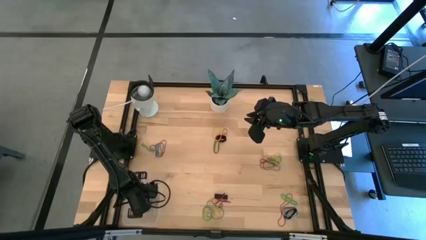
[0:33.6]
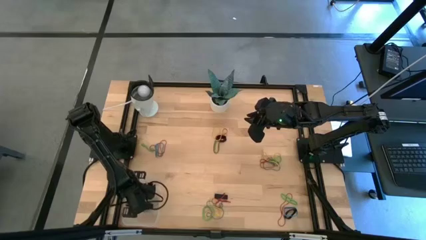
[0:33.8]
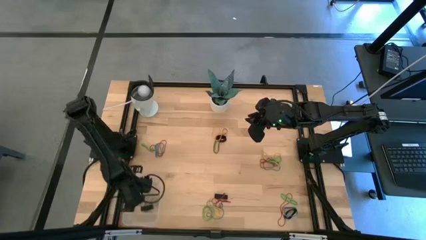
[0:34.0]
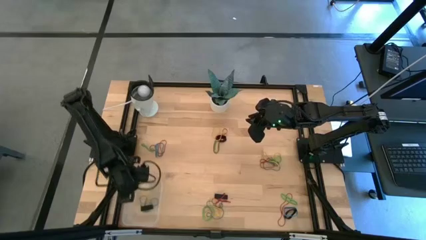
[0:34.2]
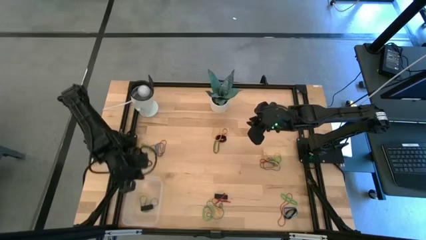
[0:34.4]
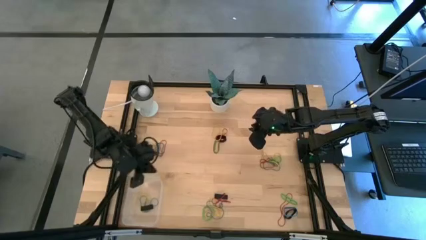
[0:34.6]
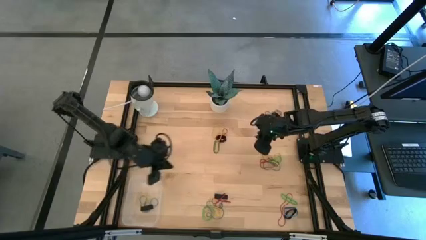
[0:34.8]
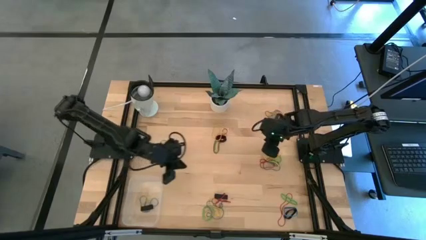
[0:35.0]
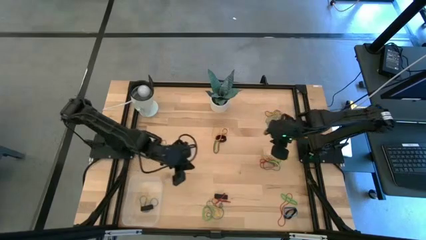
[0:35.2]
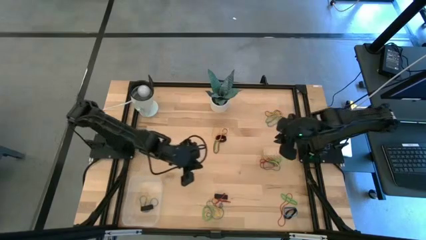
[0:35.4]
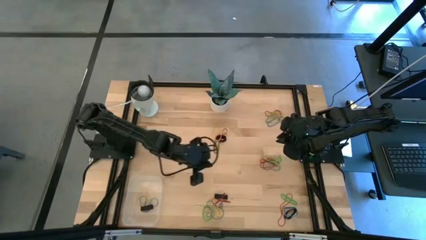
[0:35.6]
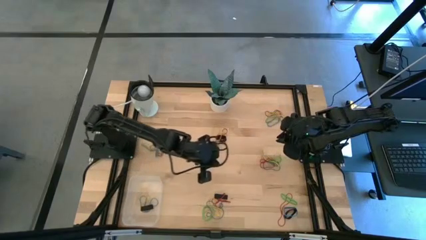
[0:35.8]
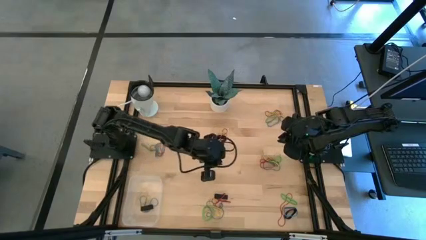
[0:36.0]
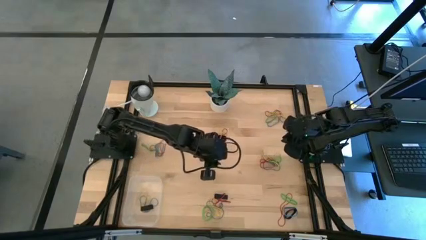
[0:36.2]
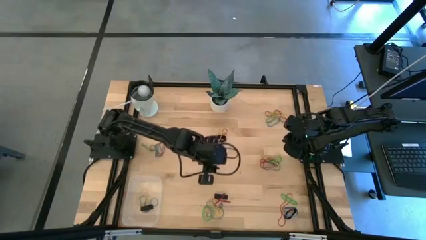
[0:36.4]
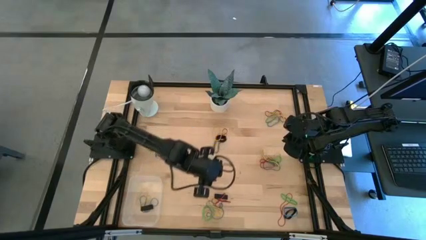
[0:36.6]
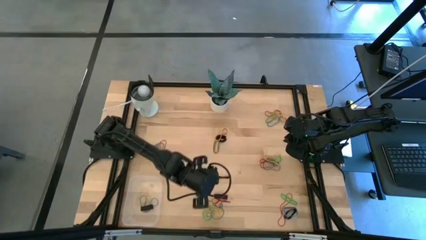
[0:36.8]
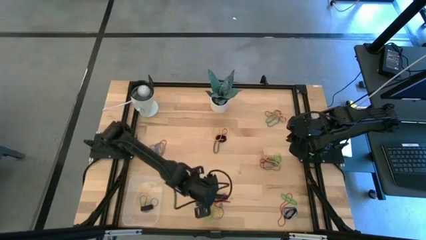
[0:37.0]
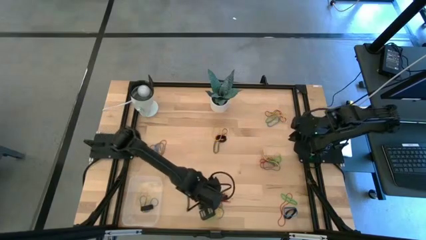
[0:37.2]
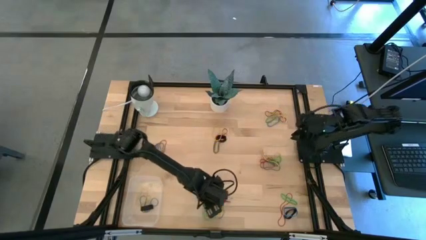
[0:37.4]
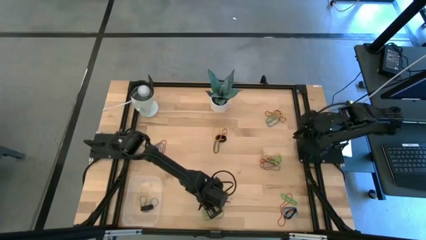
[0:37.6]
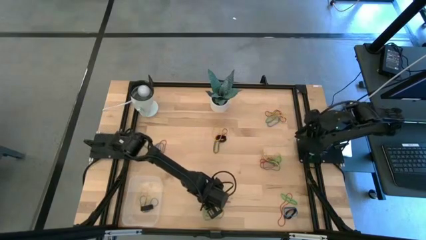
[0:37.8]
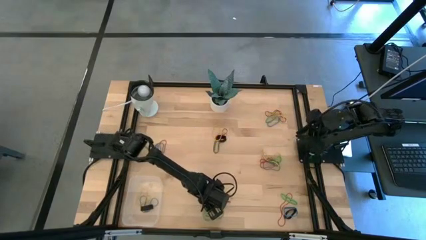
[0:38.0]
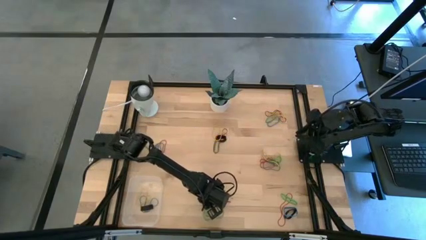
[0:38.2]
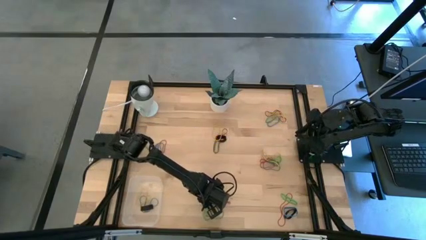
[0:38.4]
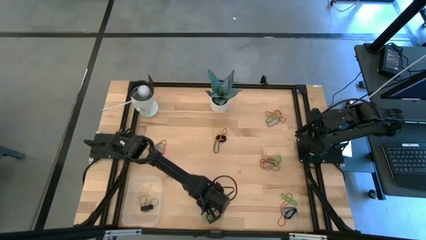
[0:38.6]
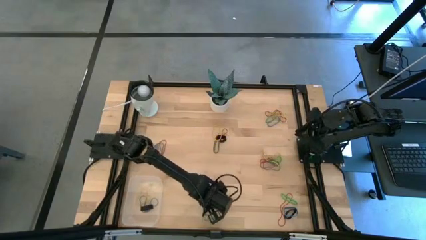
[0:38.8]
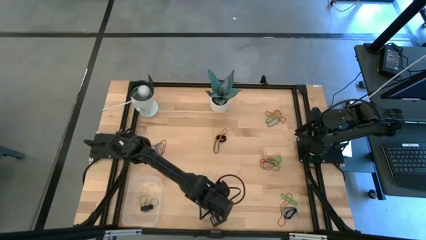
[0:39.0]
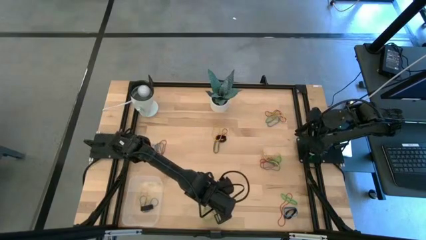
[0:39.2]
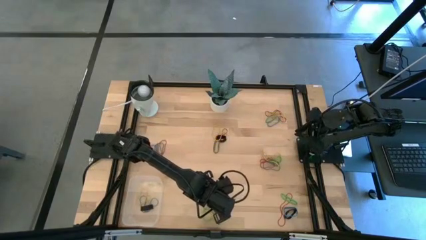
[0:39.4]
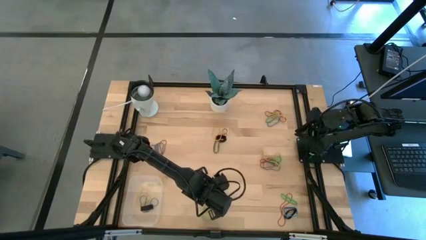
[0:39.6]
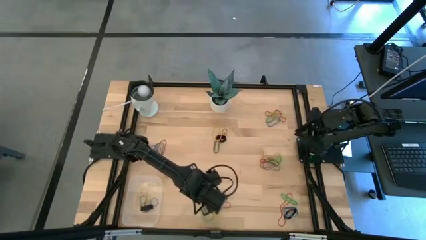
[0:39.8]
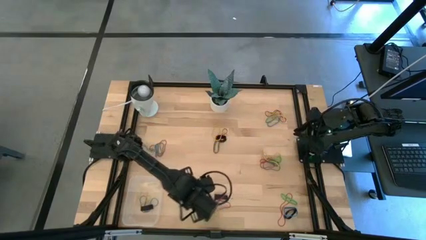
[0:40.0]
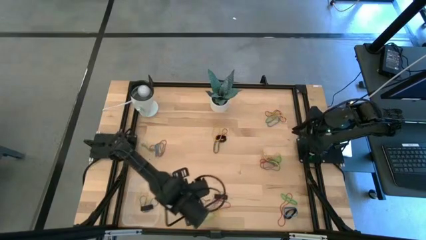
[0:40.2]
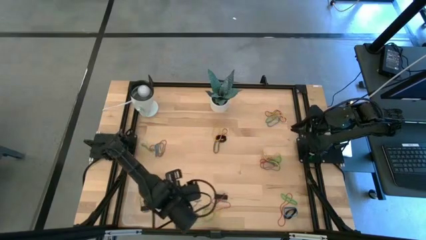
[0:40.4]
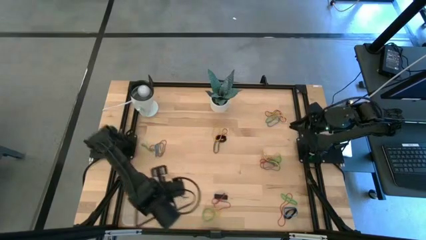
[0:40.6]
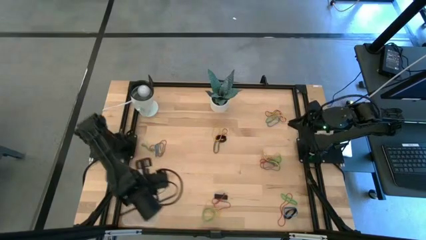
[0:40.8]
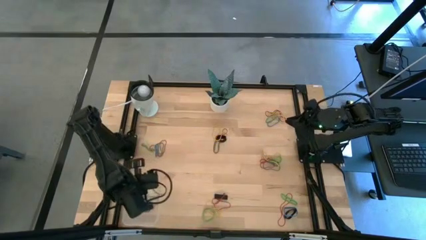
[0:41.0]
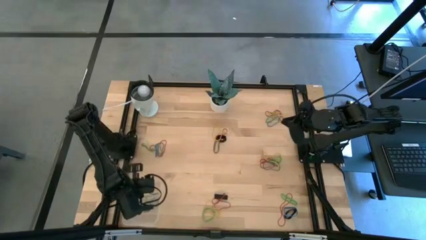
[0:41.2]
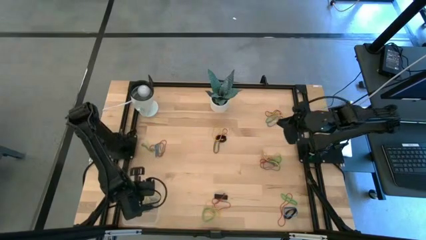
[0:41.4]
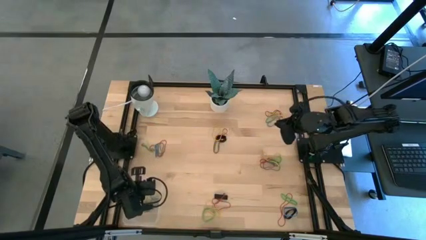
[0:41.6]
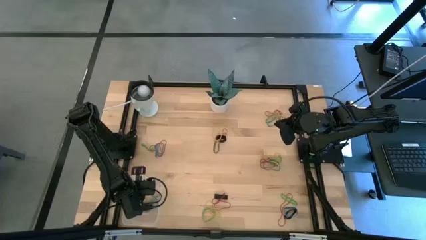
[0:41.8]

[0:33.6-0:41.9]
Task: Pick and place rubber bands into bin
Put the blue rubber band into the transparent bin

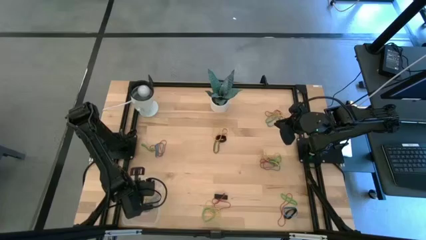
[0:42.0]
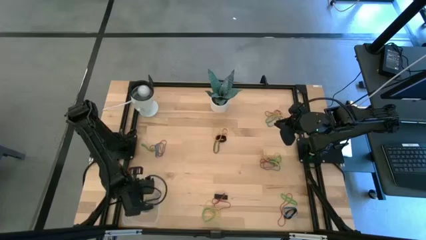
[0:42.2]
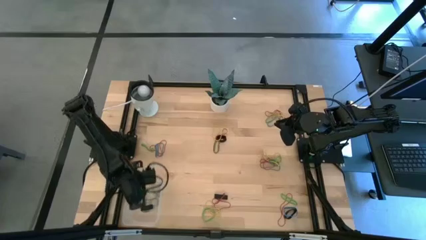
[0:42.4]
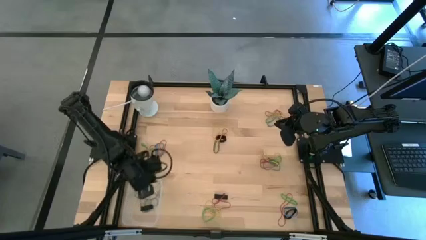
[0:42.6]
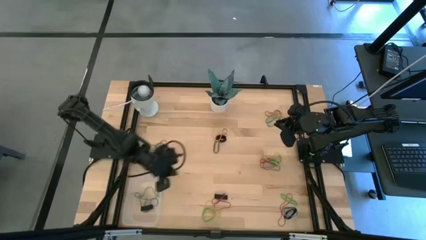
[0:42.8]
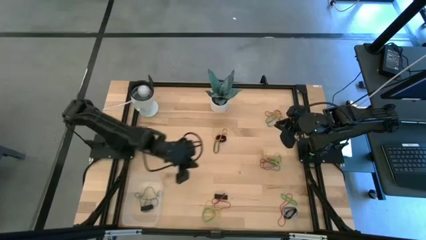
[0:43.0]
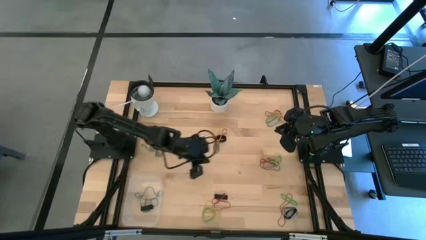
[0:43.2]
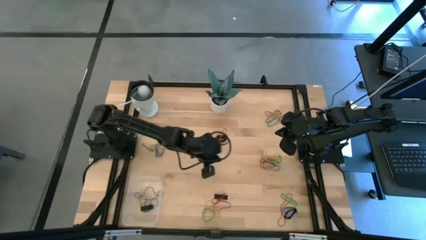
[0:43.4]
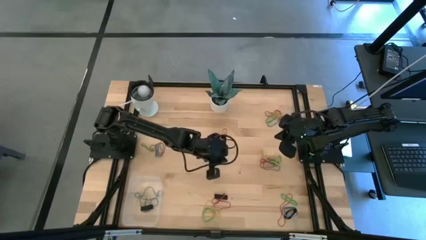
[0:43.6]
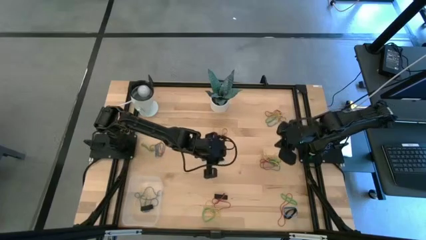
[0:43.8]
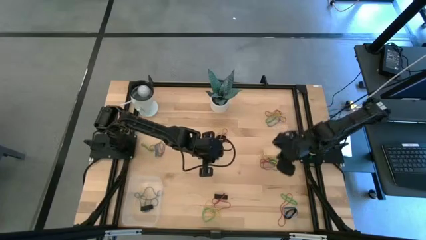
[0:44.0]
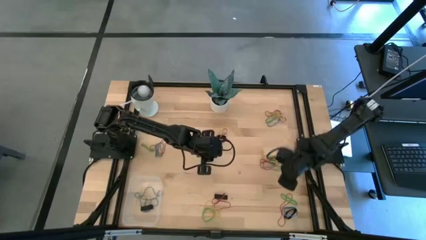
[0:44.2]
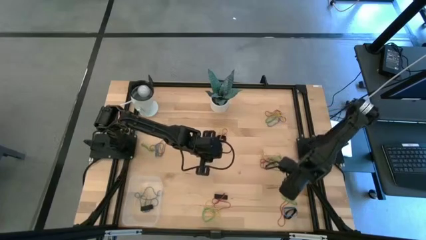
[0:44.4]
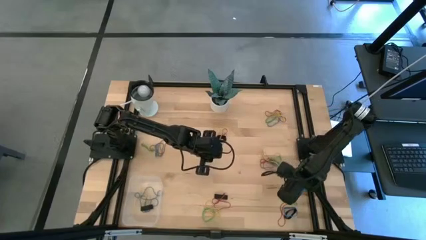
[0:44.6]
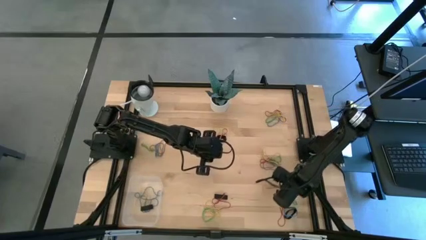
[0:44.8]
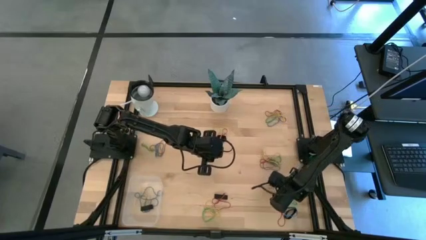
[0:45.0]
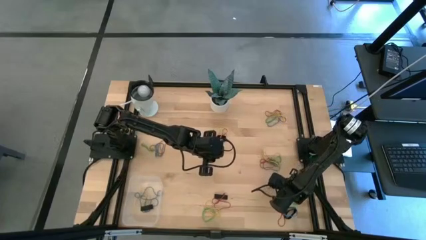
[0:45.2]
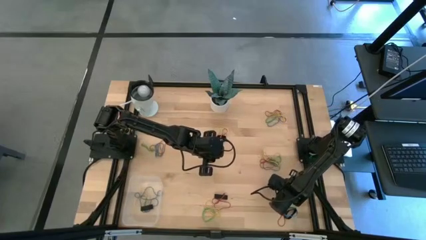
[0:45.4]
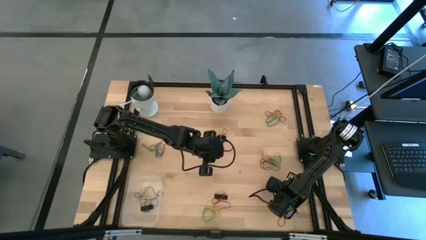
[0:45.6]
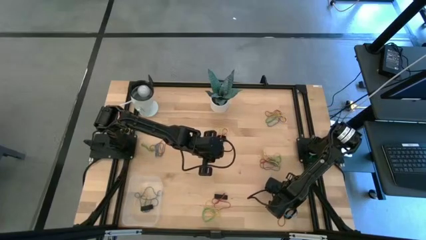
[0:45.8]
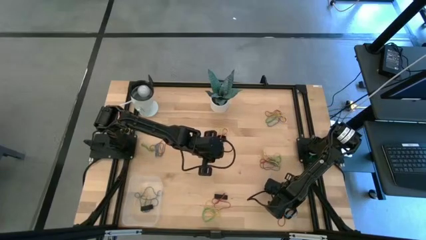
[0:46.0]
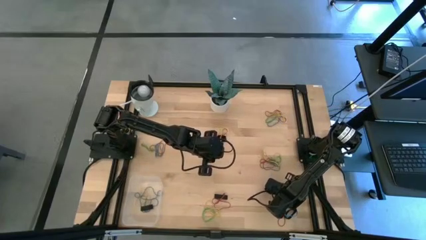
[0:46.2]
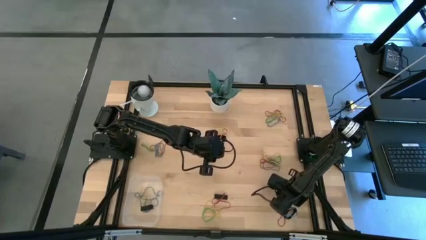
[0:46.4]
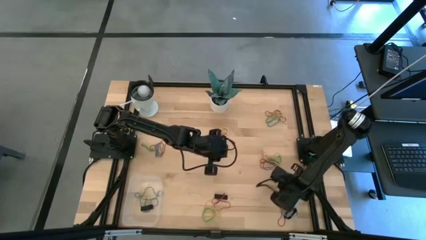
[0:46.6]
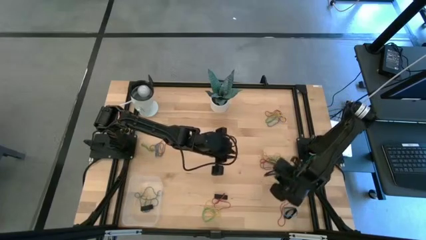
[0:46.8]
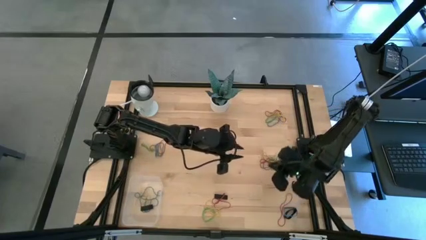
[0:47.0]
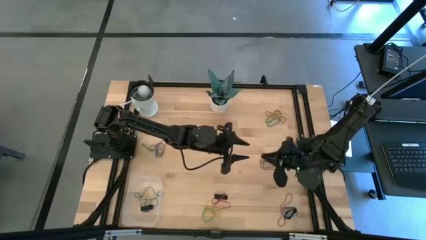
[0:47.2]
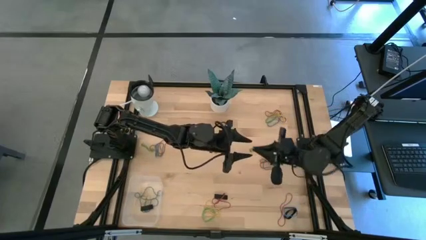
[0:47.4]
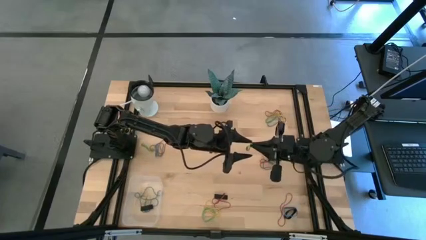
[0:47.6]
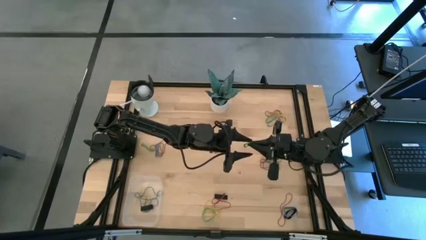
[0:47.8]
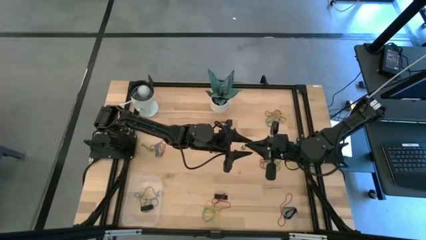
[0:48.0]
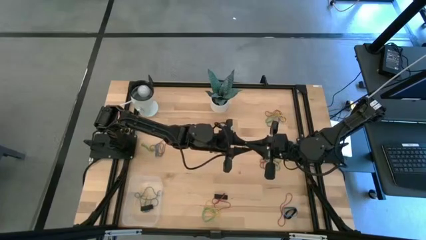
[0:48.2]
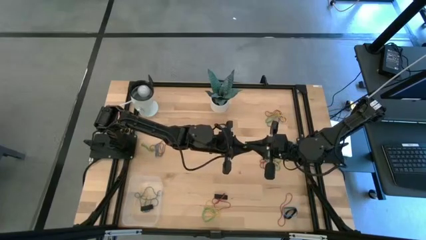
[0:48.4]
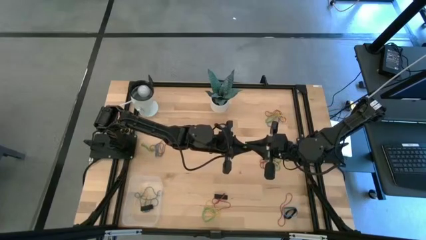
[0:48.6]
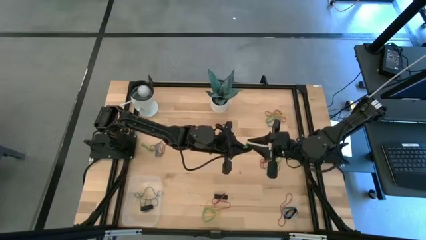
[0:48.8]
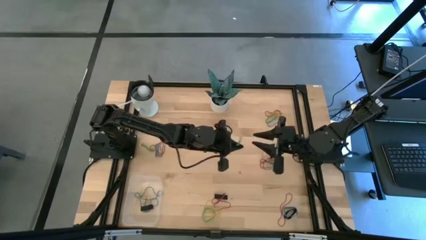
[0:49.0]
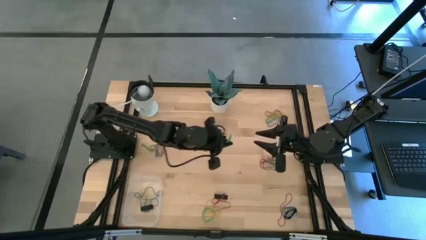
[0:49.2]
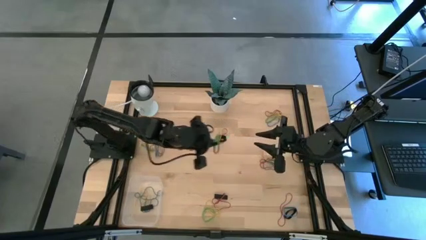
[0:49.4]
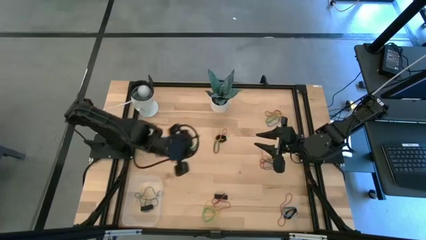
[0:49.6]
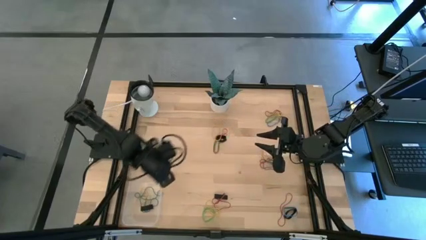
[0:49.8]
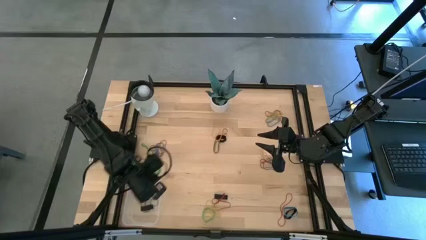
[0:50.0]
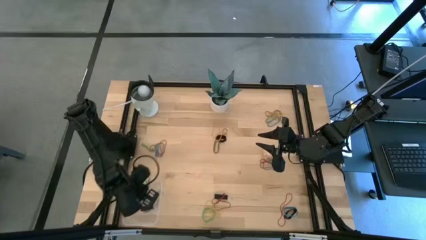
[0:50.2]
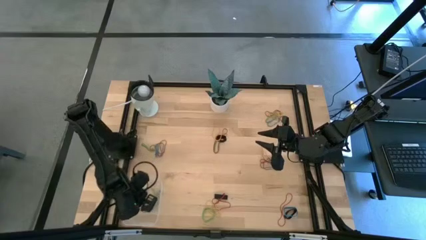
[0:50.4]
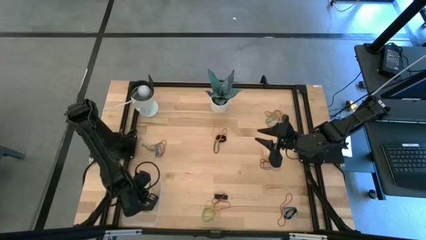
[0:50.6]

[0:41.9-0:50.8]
Put the green rubber band into the transparent bin
